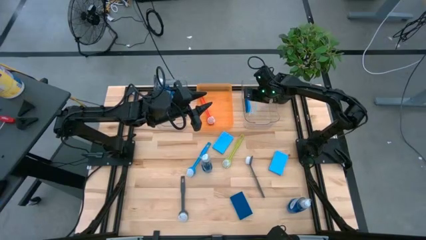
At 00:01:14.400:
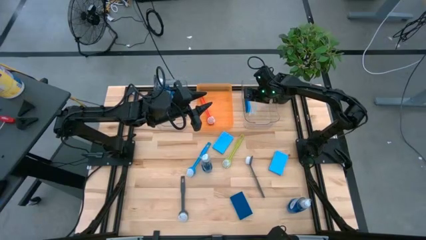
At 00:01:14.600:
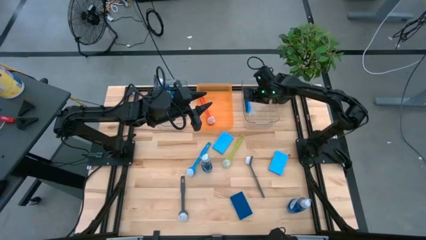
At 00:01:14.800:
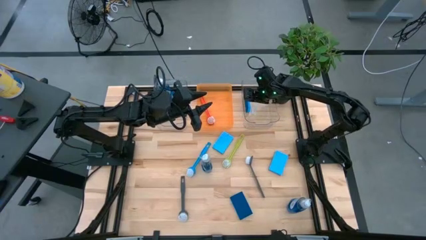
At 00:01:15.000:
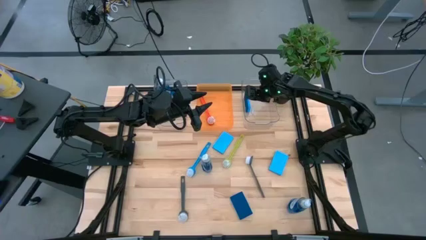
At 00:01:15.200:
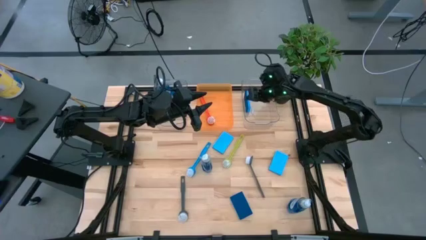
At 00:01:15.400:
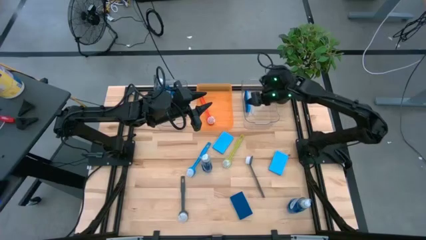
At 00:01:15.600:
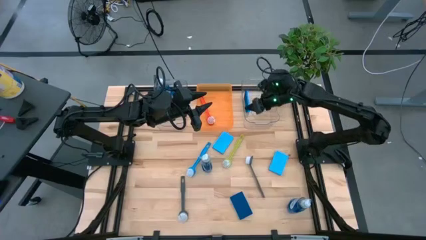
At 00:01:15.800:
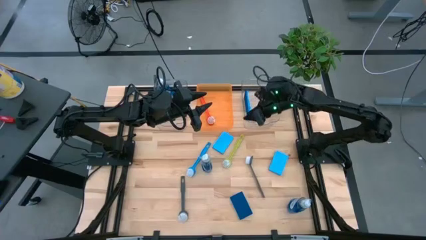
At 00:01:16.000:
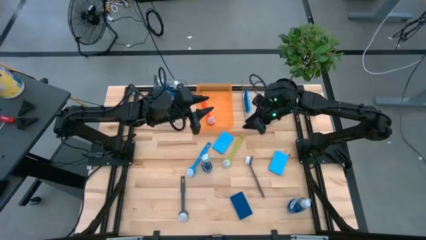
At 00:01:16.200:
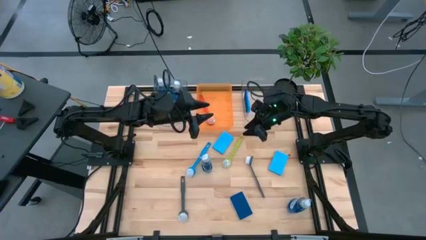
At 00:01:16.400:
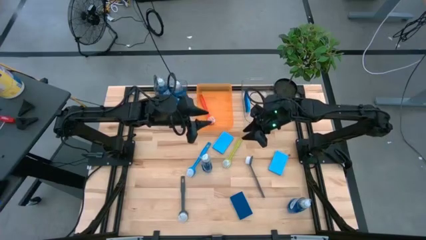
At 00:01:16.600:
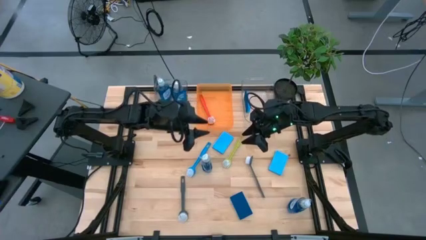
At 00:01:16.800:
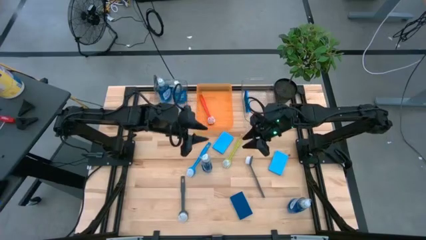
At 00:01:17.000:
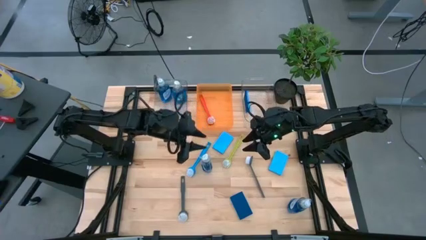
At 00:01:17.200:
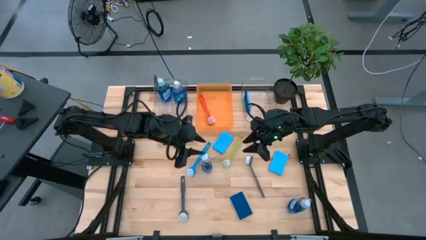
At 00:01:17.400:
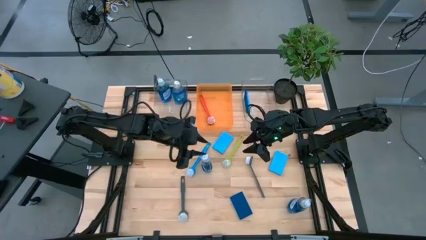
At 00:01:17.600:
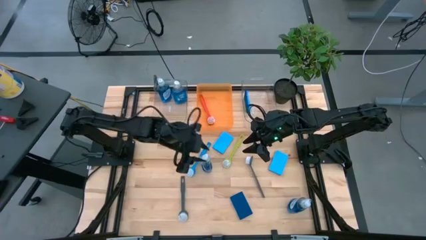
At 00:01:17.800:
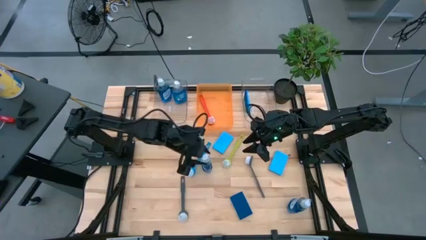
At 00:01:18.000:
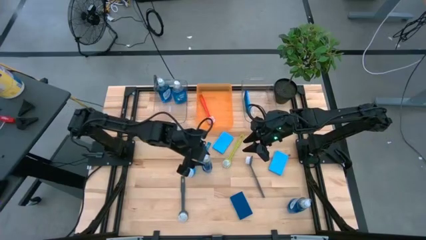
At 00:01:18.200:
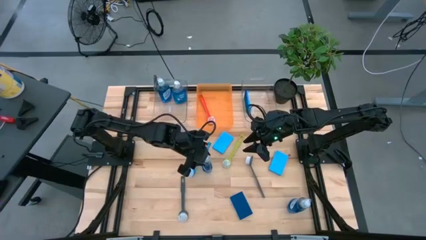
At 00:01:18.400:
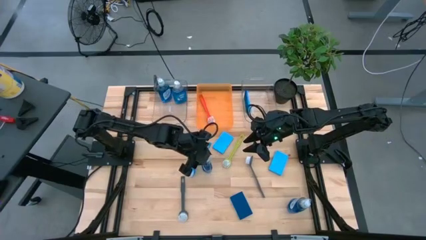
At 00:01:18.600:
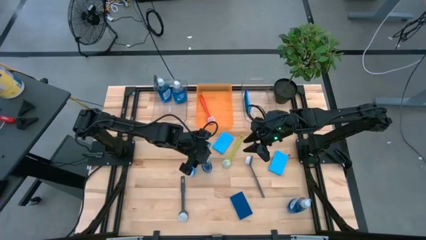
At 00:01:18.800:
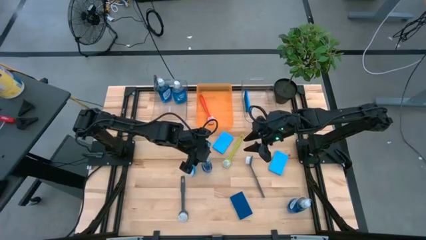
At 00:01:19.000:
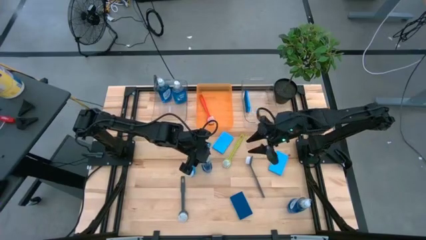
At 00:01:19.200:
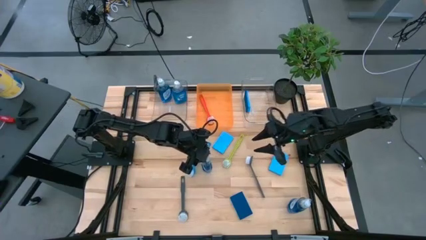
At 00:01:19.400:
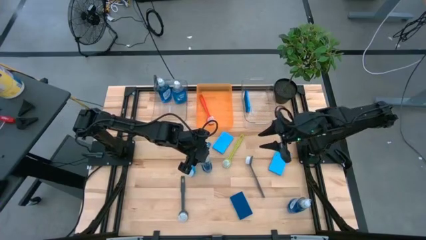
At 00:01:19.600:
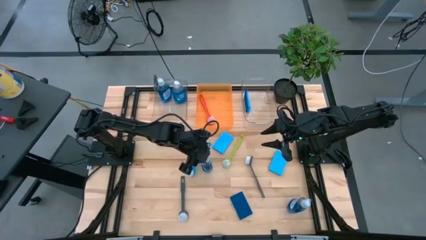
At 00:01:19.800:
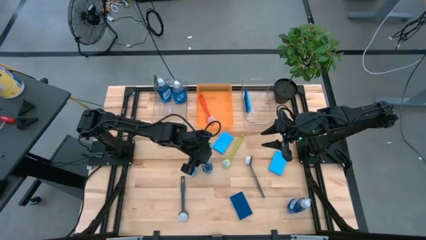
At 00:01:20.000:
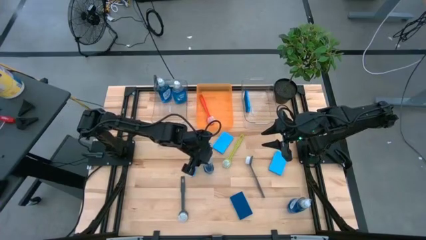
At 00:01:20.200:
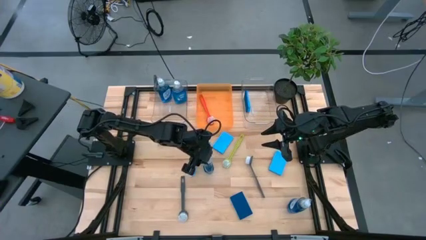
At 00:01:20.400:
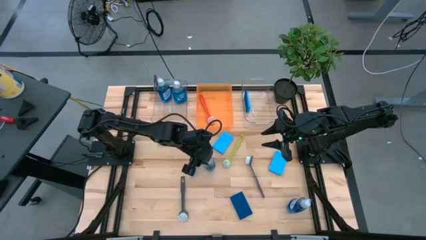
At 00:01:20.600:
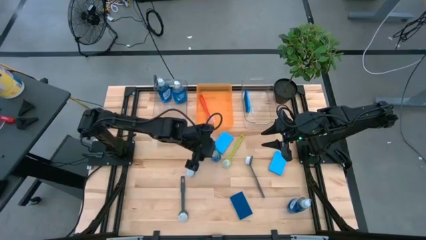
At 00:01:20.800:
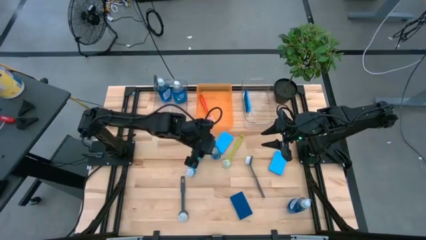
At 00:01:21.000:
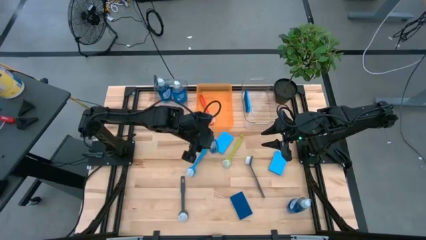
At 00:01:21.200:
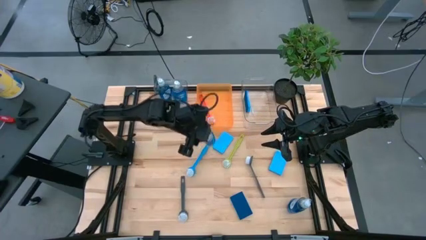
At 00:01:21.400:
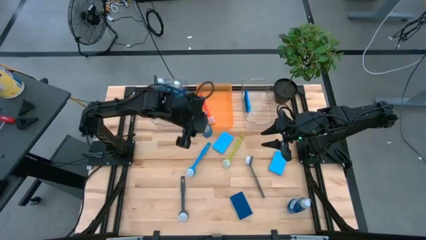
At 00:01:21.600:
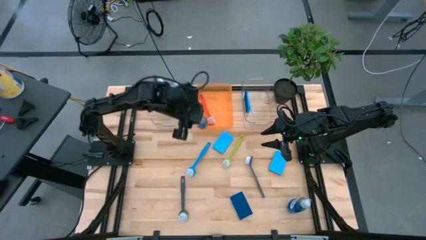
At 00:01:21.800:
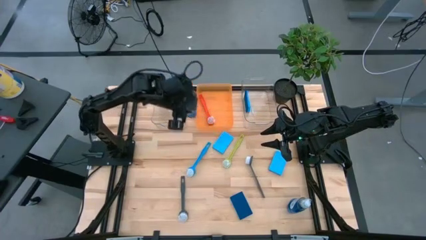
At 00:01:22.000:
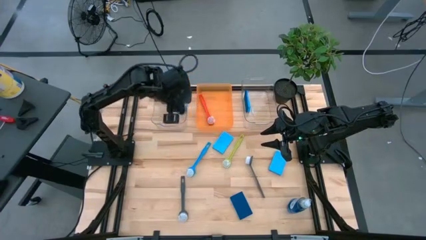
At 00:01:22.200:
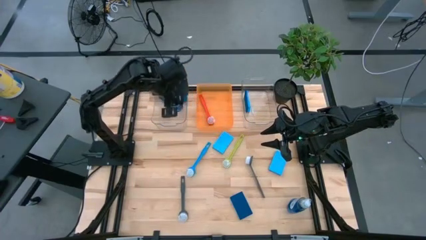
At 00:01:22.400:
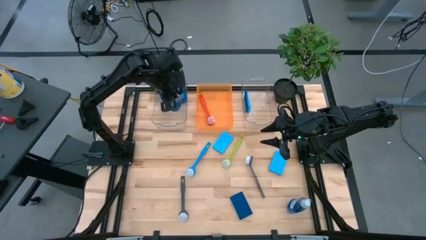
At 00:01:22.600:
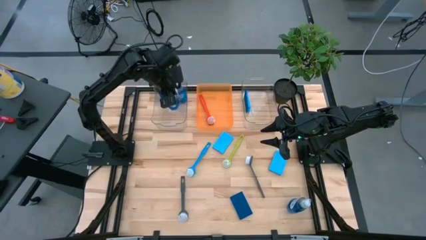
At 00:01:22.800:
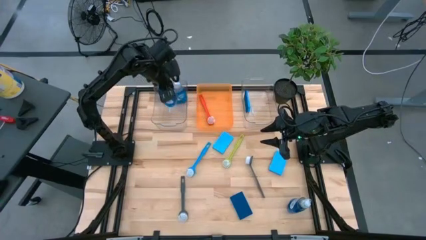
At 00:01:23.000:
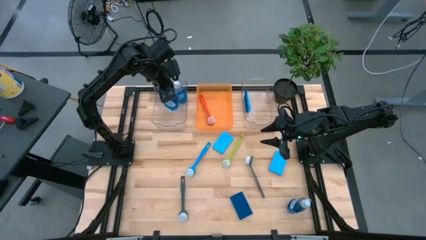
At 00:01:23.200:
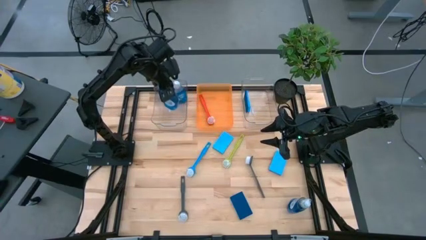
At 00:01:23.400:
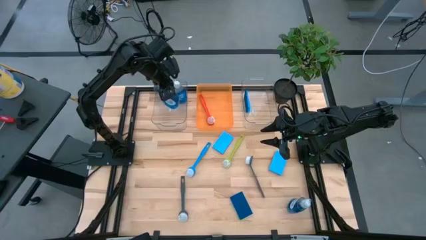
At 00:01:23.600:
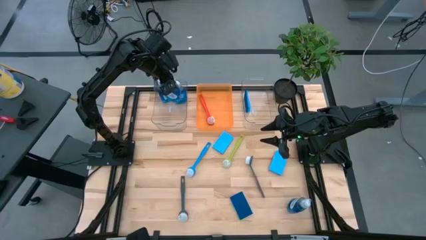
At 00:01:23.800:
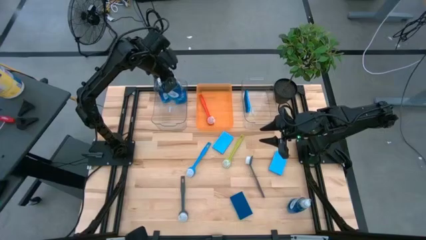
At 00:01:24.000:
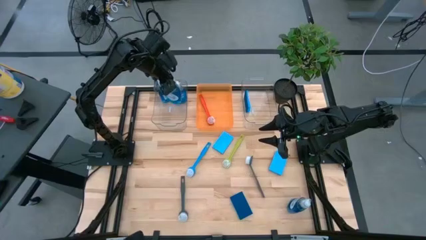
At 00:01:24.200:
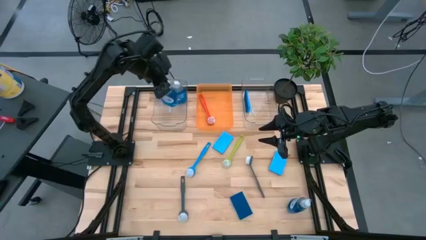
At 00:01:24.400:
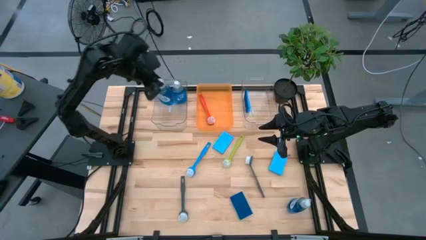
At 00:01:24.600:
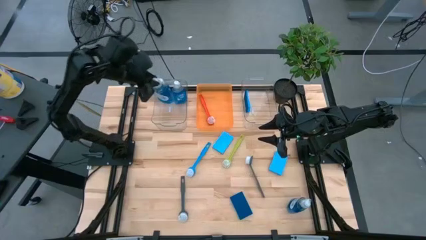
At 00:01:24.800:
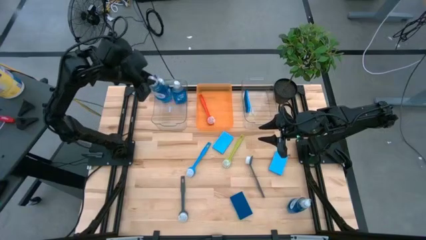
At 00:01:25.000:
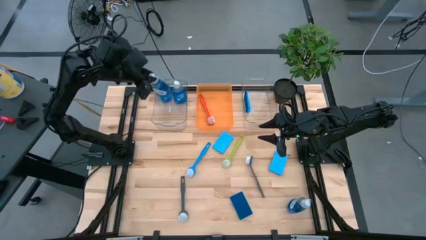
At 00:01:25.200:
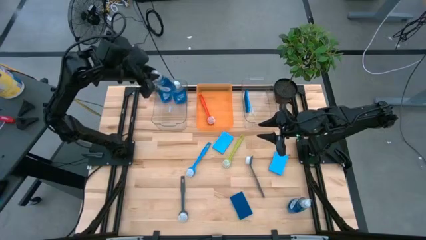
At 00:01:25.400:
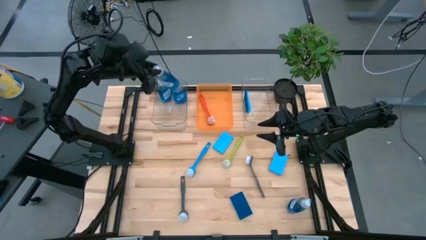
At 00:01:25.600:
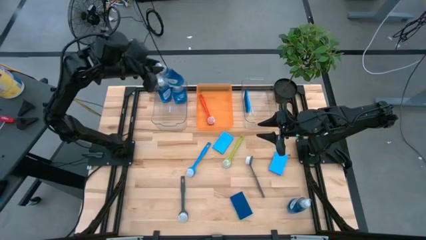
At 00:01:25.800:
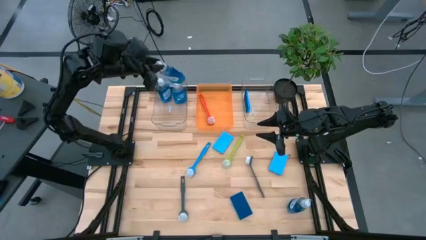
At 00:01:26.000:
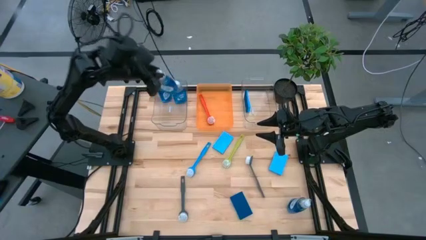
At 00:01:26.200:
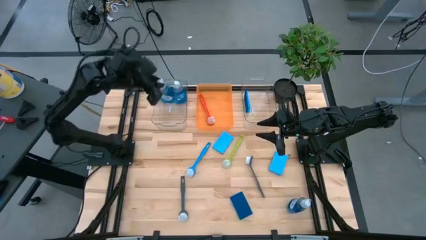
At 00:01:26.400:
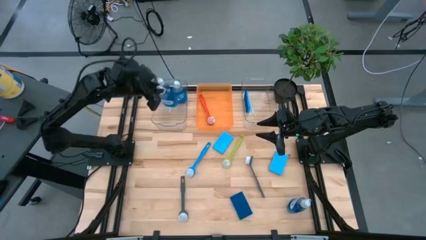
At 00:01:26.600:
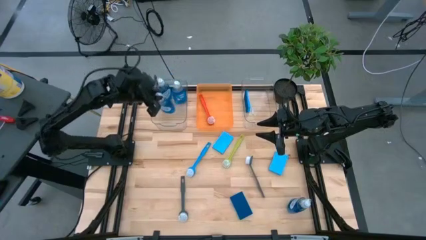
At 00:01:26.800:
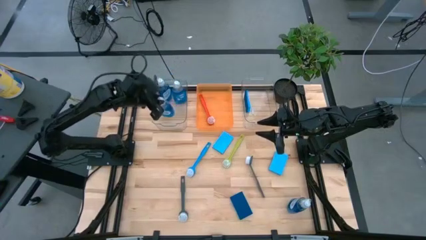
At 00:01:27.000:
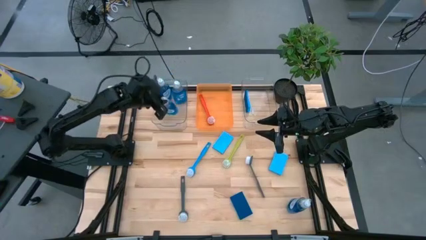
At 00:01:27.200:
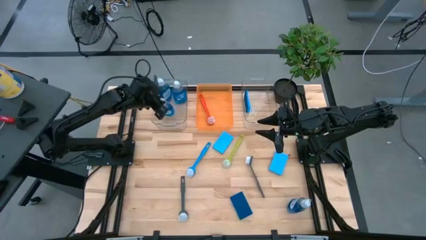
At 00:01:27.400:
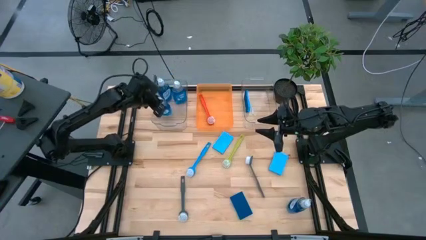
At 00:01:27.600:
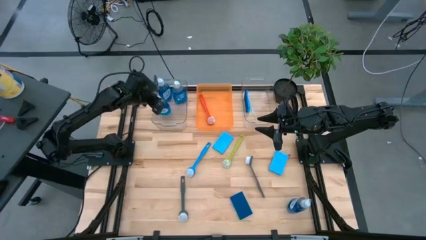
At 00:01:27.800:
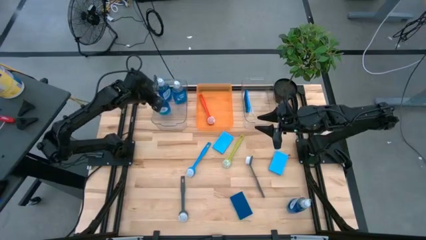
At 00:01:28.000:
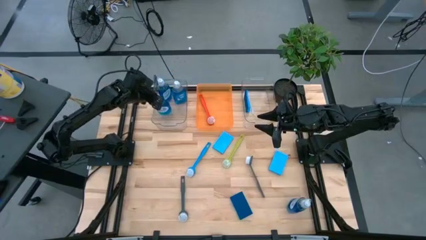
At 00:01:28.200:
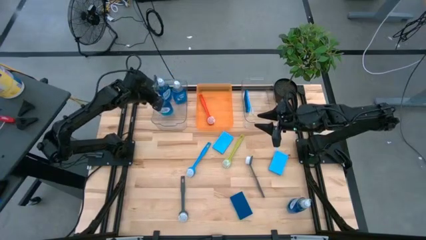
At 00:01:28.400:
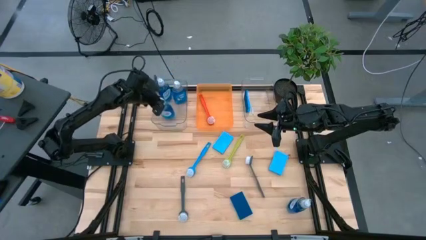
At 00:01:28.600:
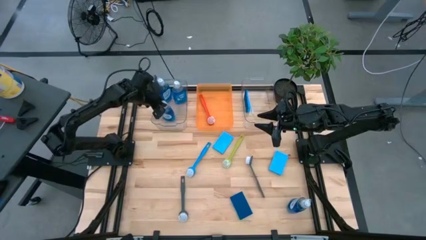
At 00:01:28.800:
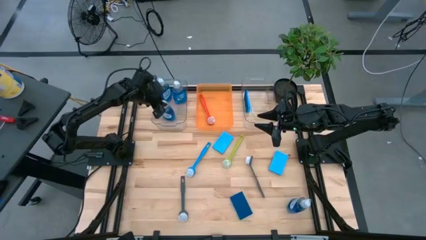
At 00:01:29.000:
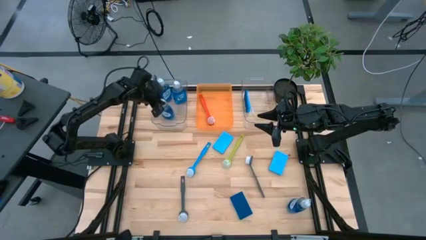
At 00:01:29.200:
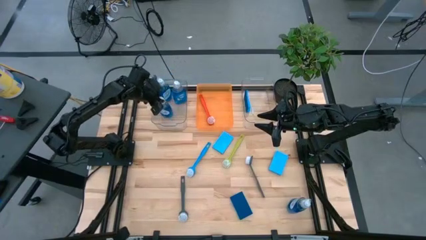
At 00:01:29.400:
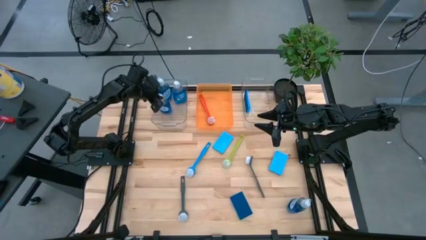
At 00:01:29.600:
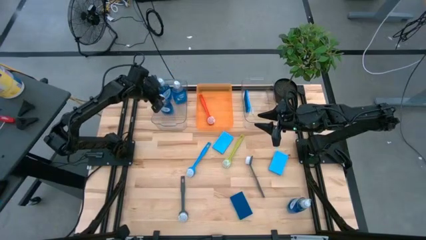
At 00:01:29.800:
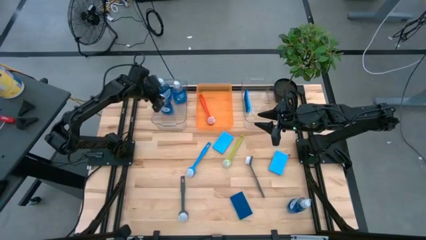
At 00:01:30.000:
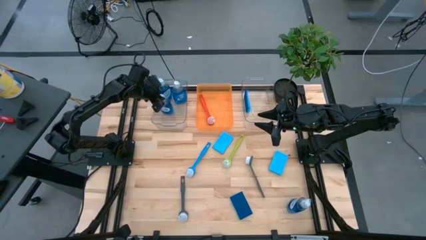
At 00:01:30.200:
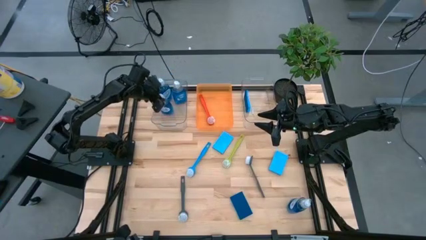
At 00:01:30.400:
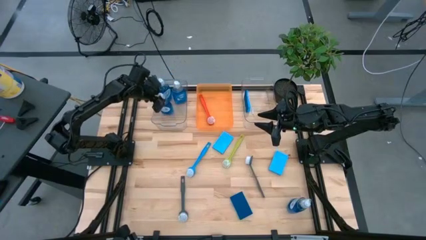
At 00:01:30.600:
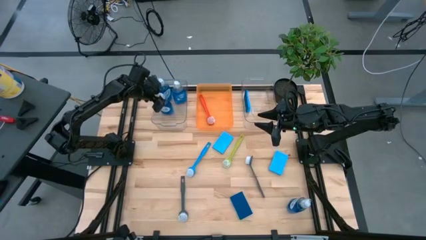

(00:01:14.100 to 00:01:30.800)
Task: Pick & Place Kitchen Sink Supplies
Put the dish soap into the left transparent bin
